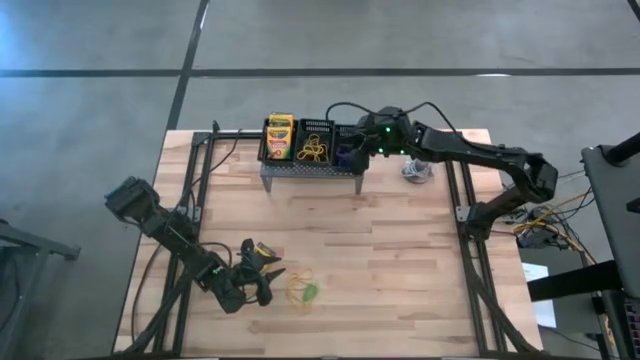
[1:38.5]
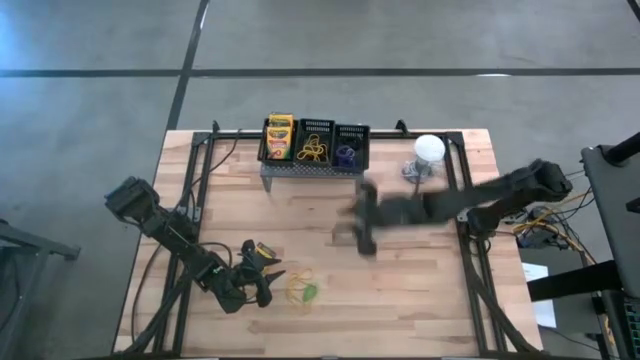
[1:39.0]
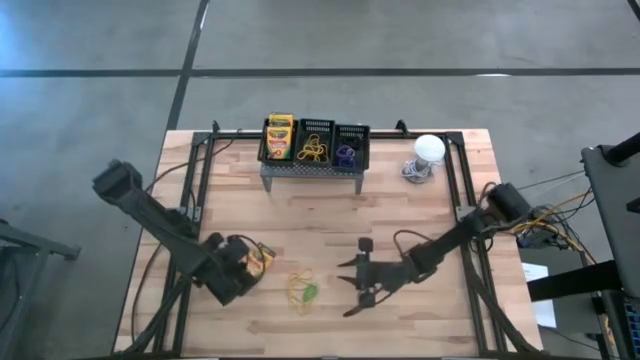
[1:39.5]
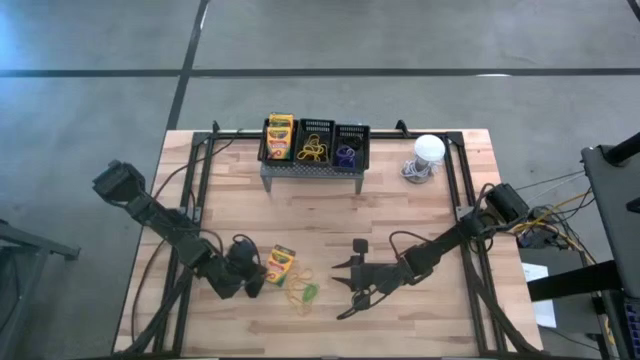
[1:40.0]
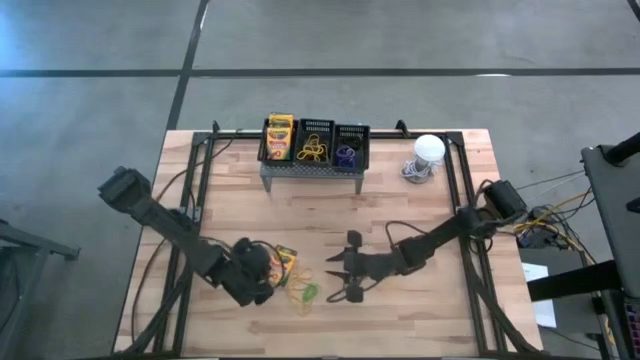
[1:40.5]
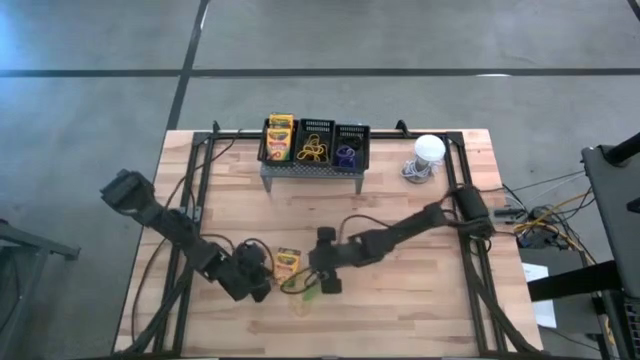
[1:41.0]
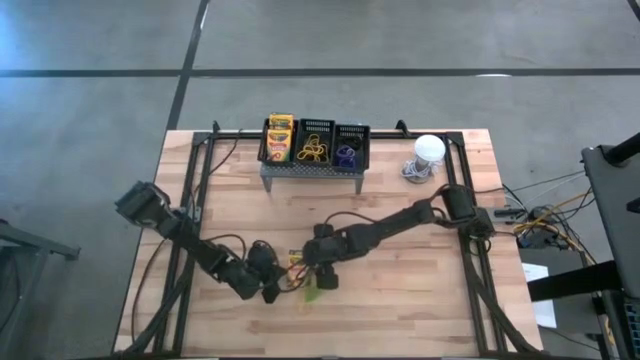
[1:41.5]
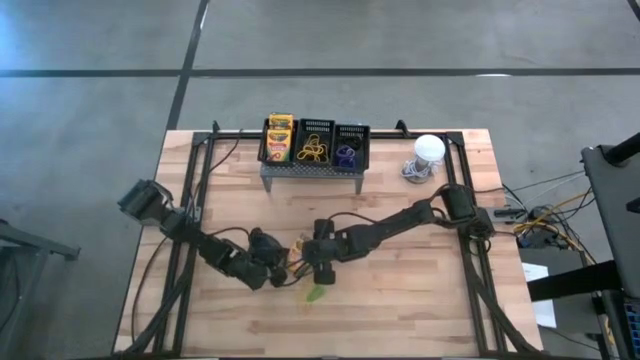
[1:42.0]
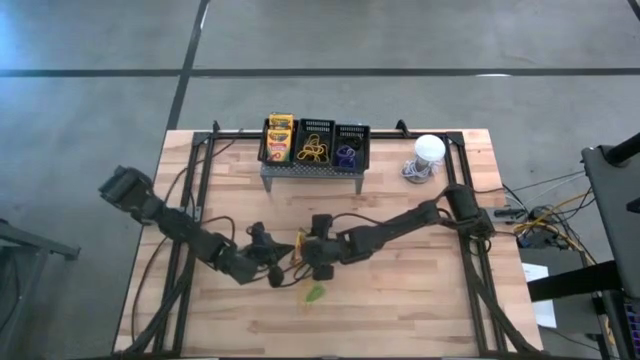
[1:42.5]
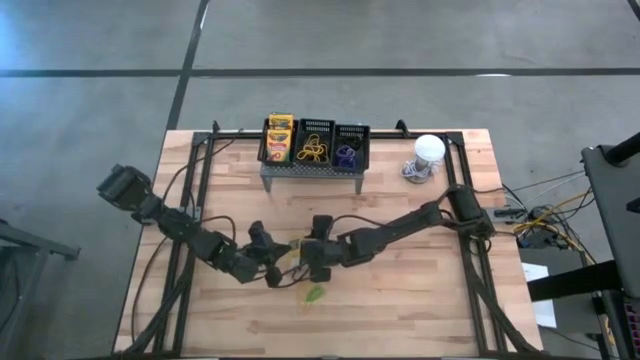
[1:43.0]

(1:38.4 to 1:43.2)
Task: Pick & Place Office Desk Supplies
Put the yellow crayon box into the left black bin on the shelf

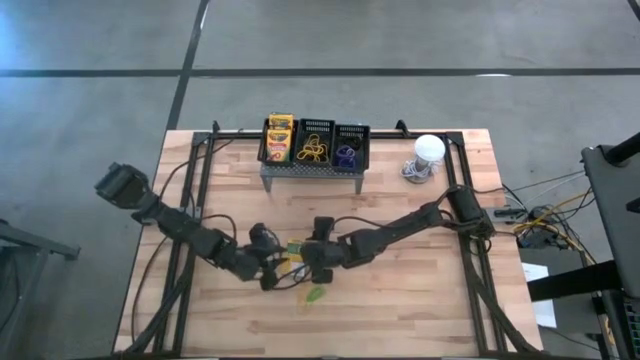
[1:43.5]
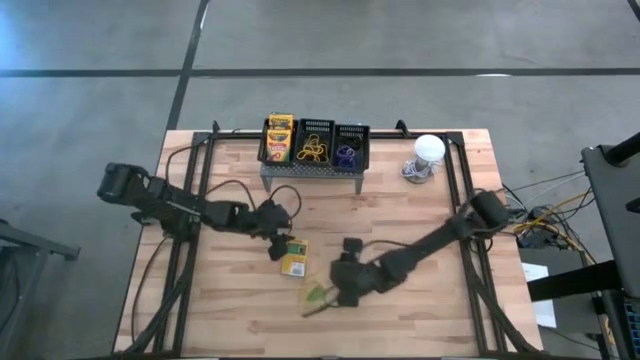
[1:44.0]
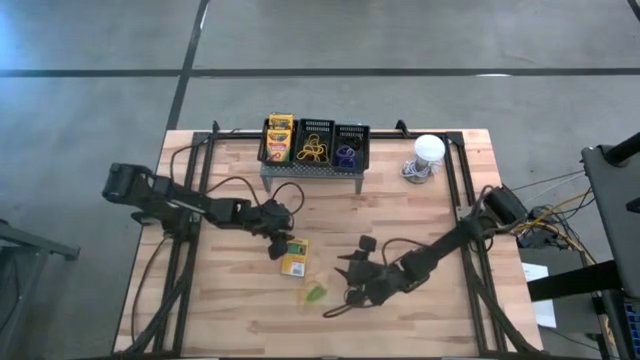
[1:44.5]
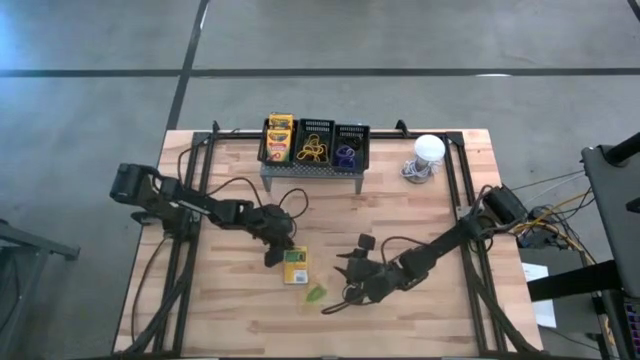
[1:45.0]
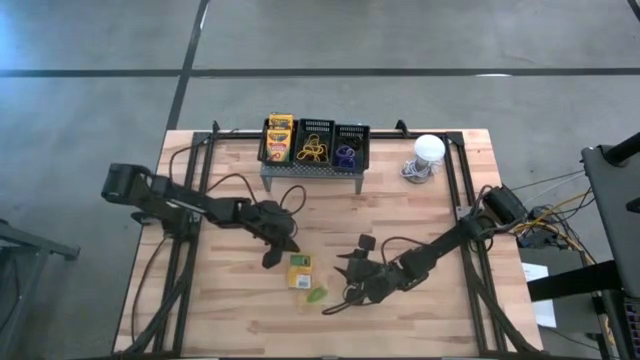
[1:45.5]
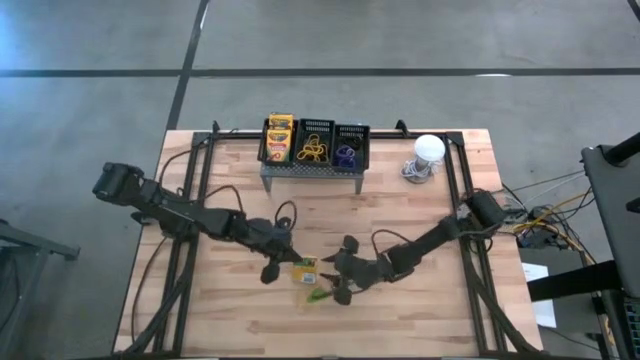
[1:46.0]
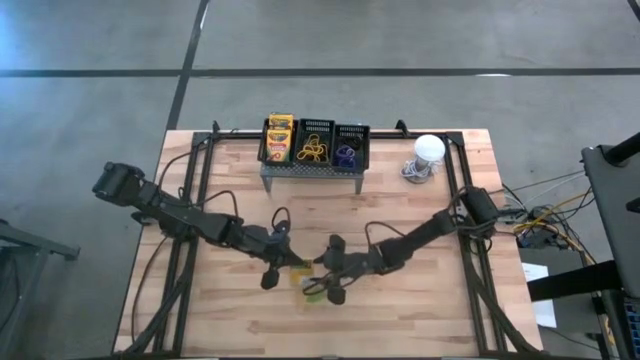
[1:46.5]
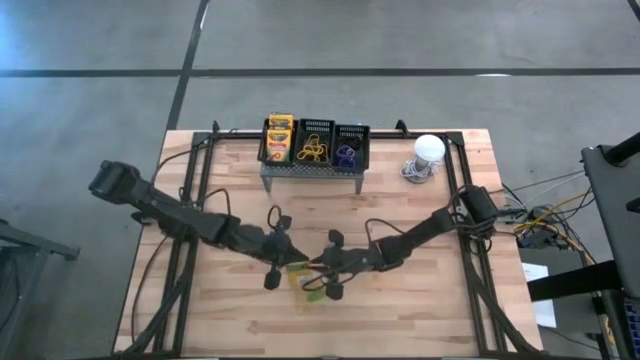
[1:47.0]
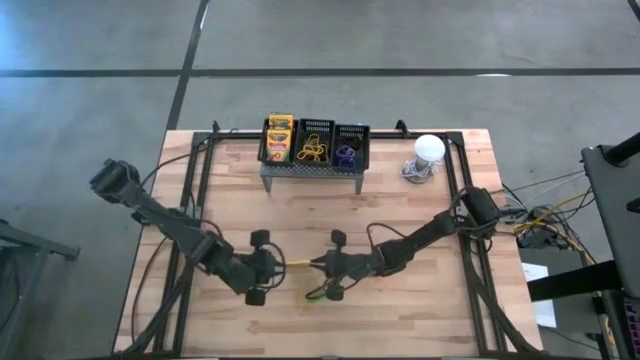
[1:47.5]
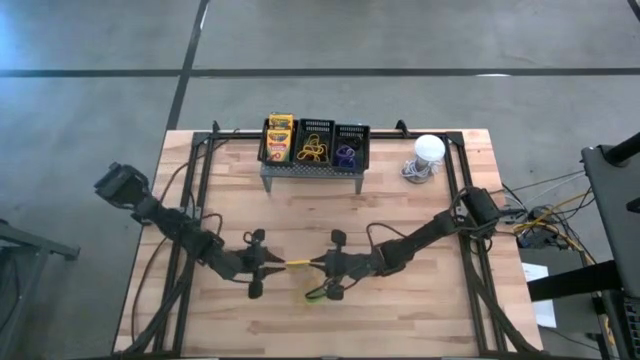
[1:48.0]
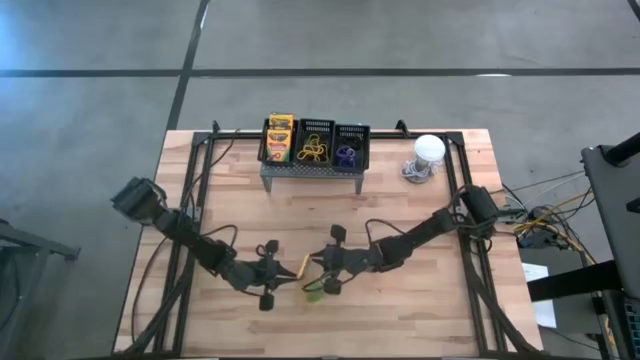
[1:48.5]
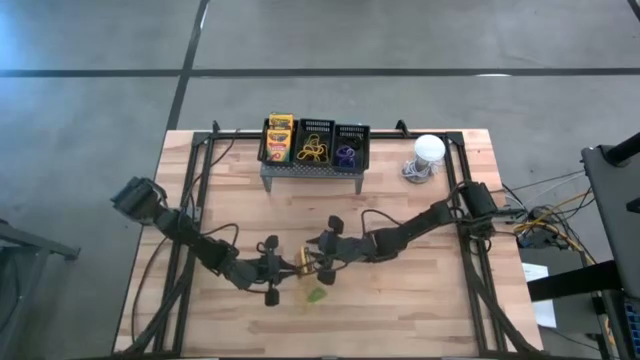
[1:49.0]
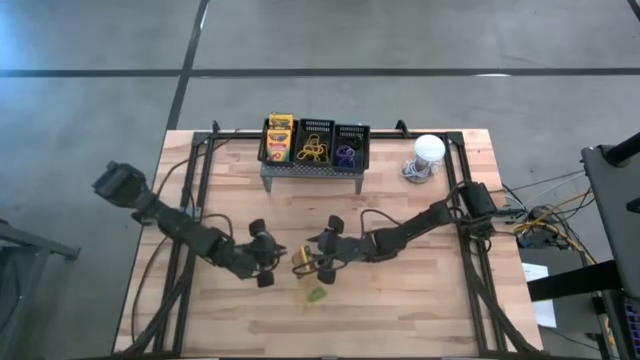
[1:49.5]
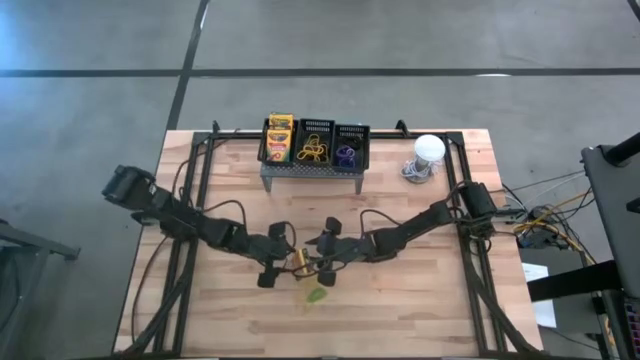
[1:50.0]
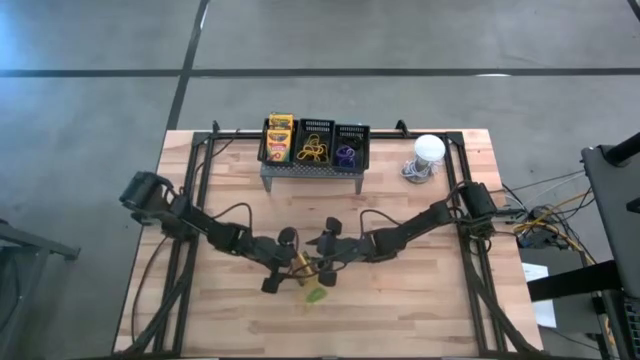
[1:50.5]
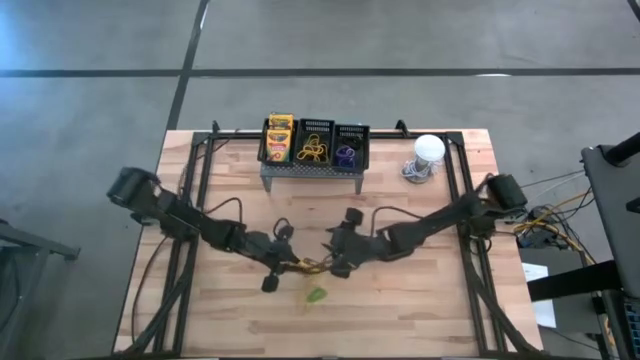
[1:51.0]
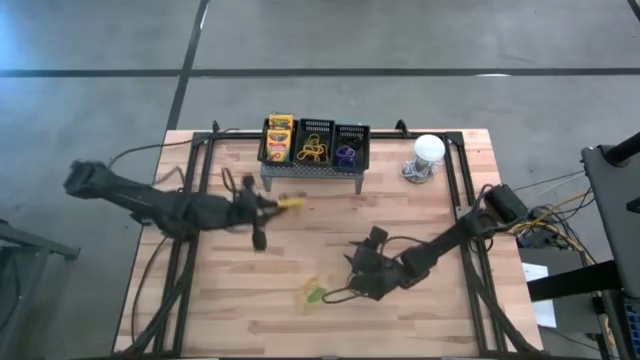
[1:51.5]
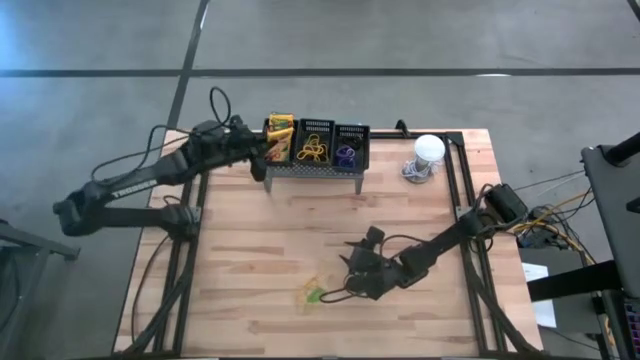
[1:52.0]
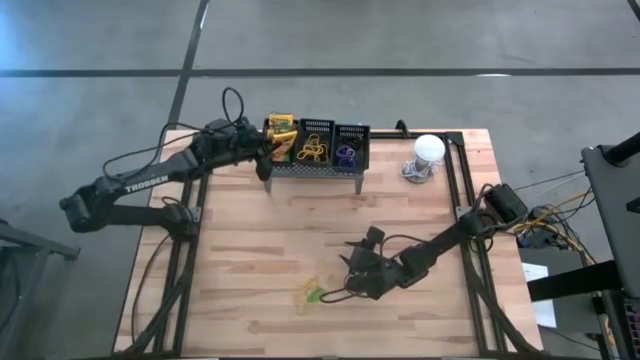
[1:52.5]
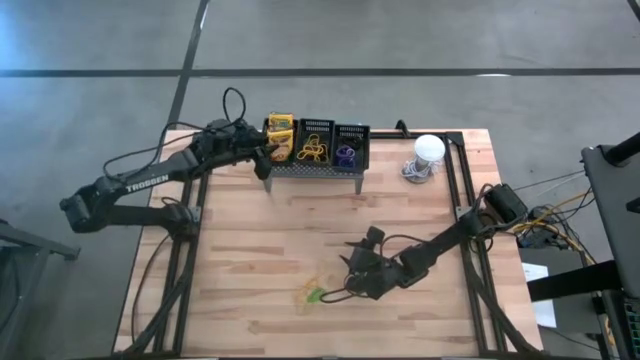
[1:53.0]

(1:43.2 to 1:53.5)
Put the yellow crayon box into the left black bin on the shelf

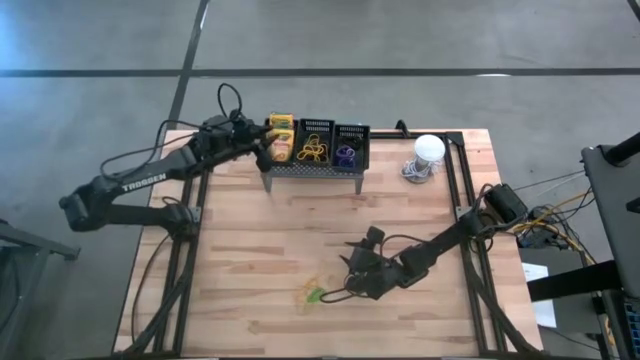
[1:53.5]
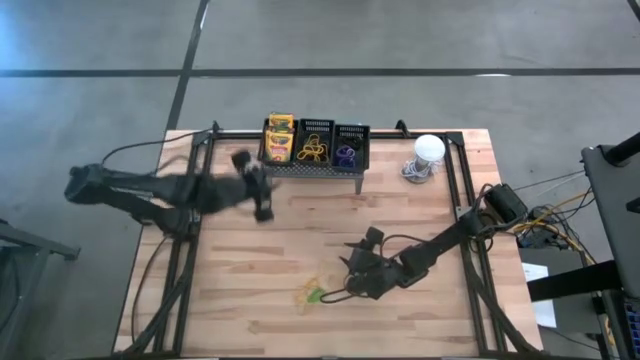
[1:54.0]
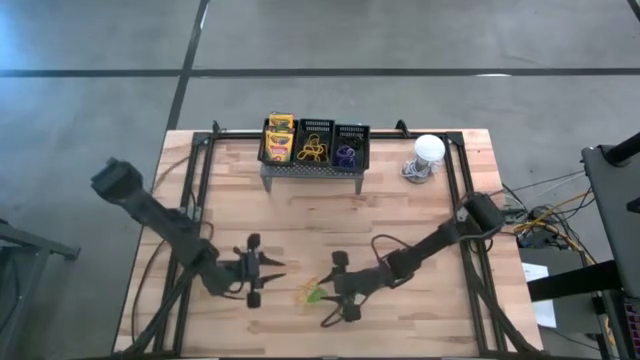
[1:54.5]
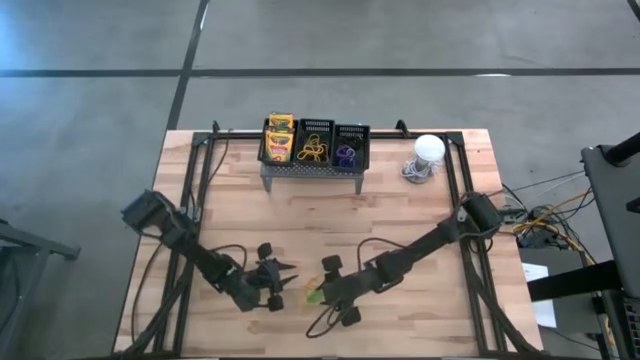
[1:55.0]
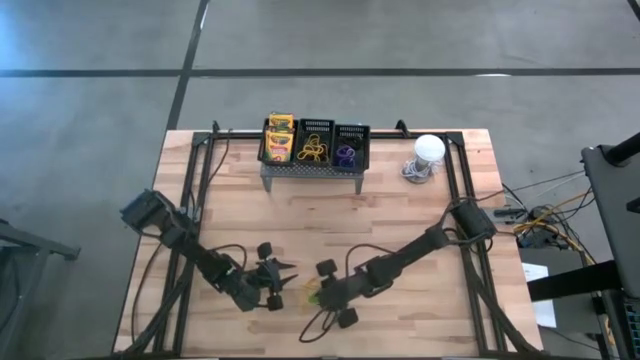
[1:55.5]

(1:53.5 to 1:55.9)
Put the green spring keychain into the right black bin on the shelf

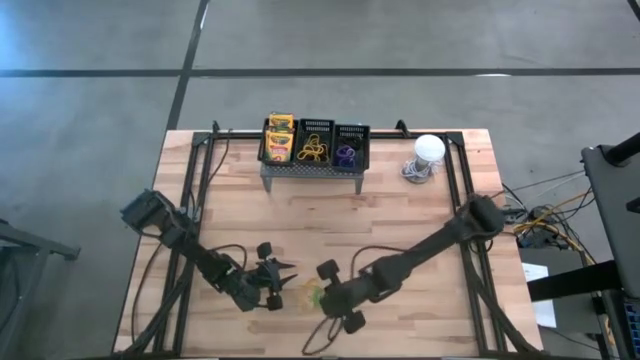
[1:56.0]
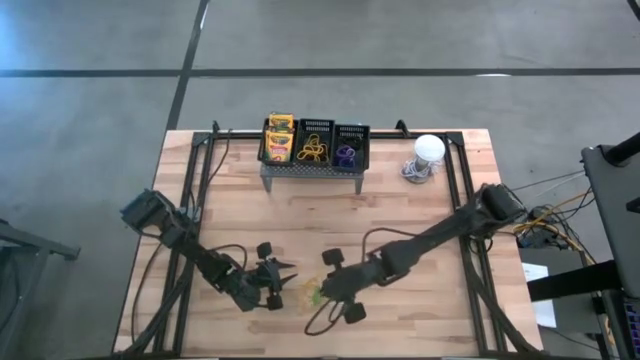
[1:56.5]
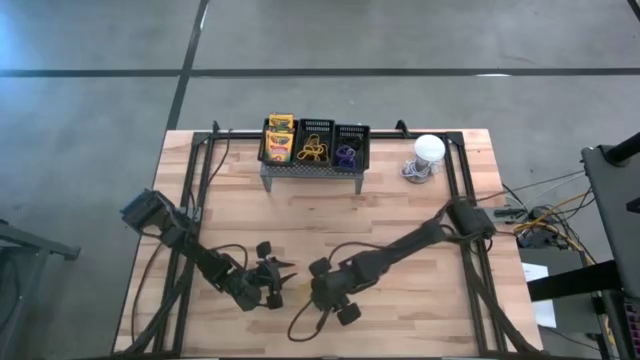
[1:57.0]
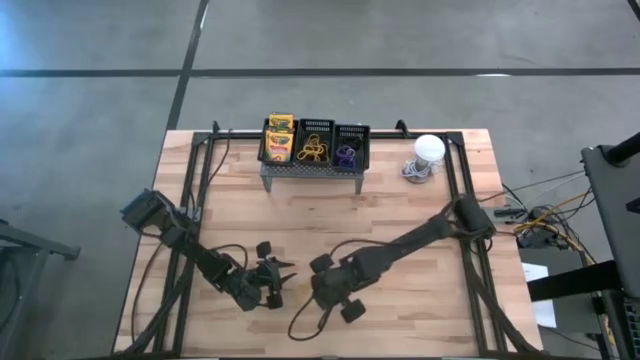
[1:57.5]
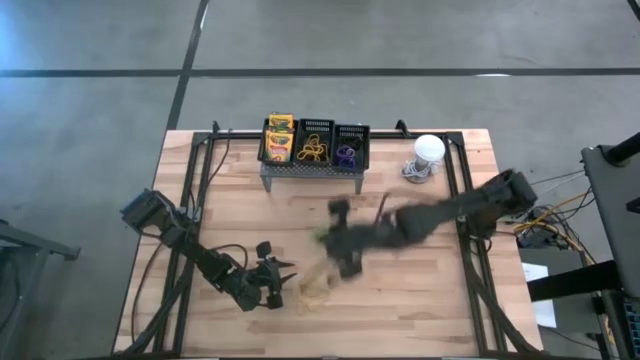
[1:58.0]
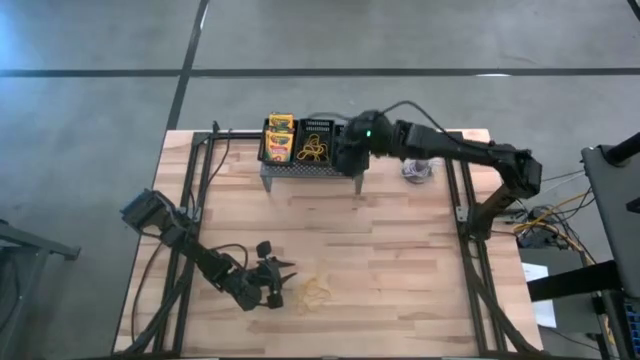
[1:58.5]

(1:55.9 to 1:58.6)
Put the green spring keychain into the right black bin on the shelf

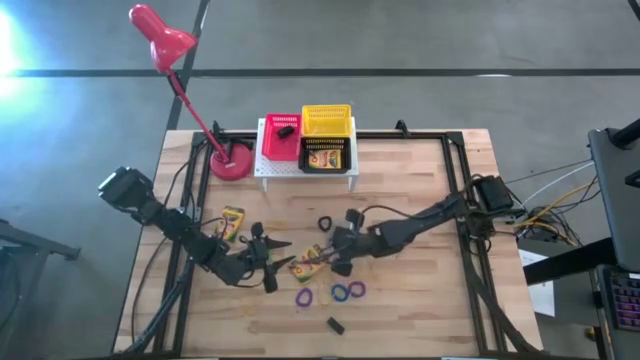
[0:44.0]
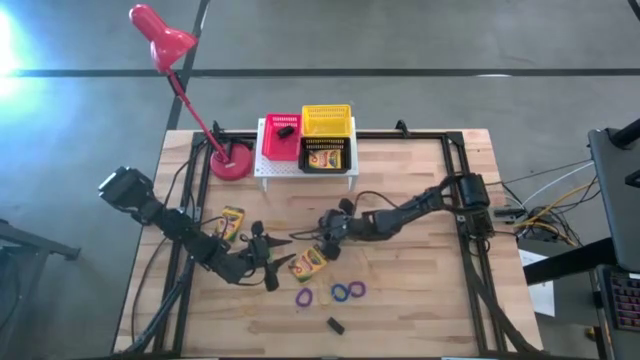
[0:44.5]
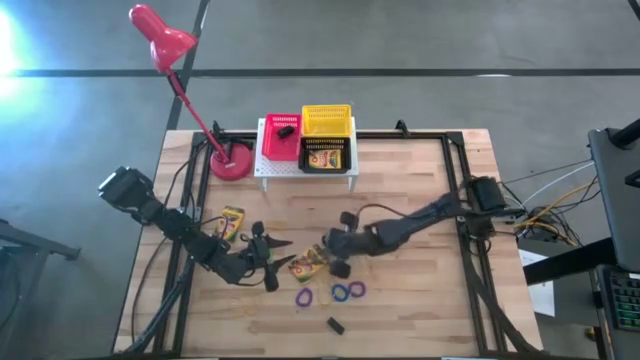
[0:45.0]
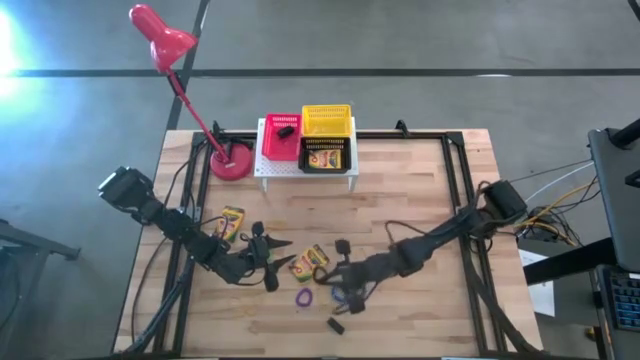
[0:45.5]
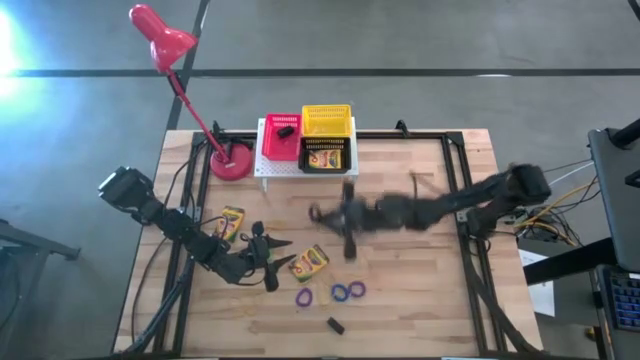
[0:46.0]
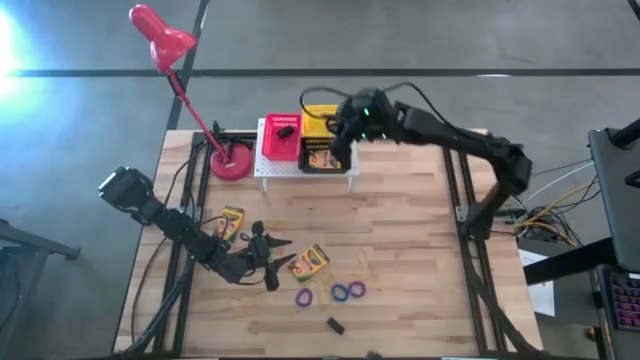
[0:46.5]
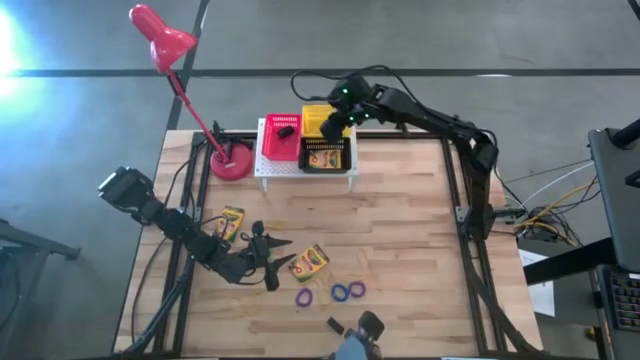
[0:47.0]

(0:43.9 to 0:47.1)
Task: Pick & Place Office Desk Supplies
Put the right black spring keychain into the yellow bin on the shelf
